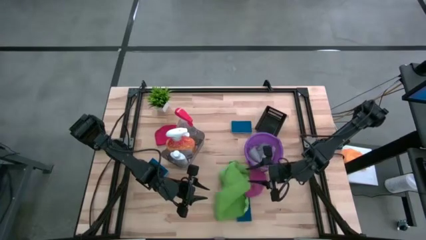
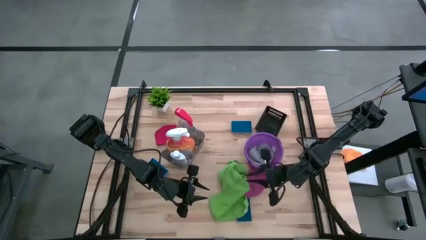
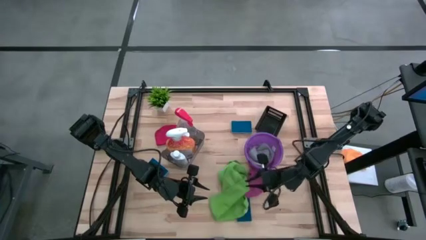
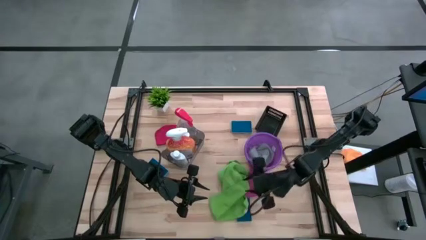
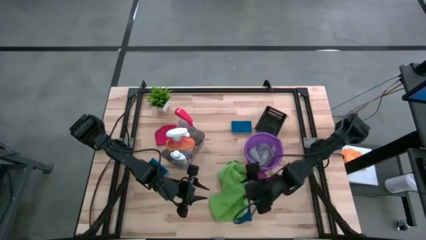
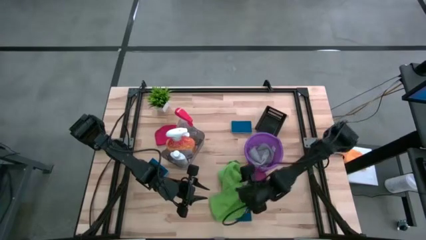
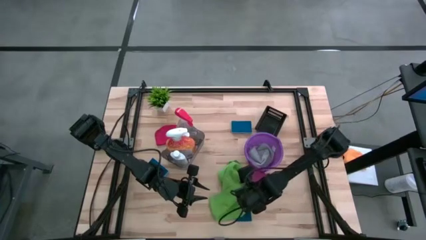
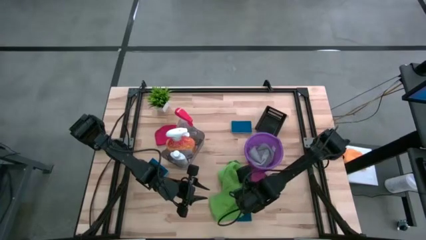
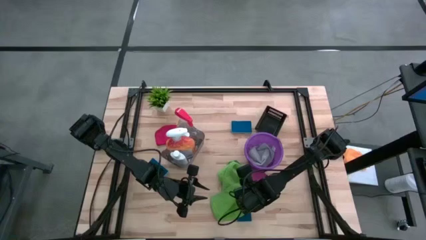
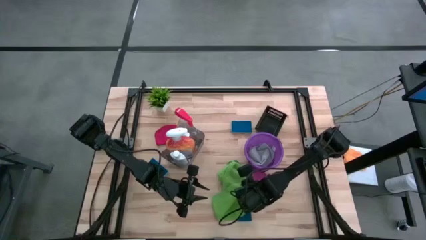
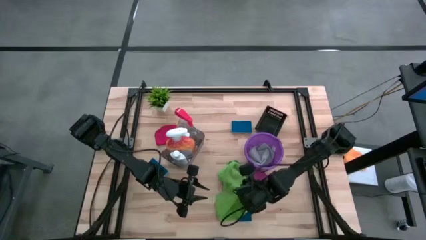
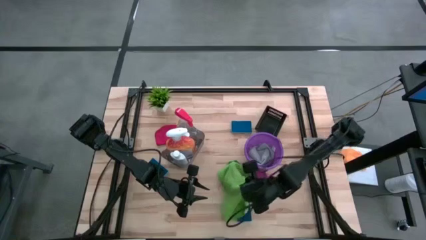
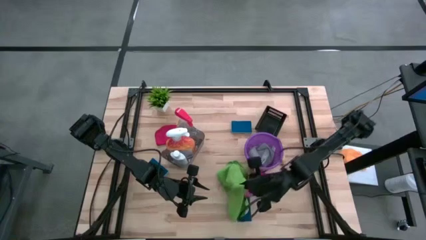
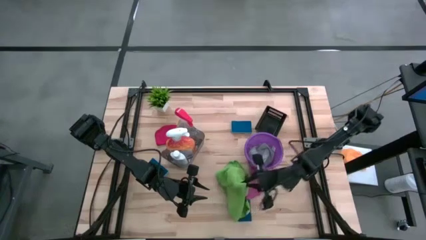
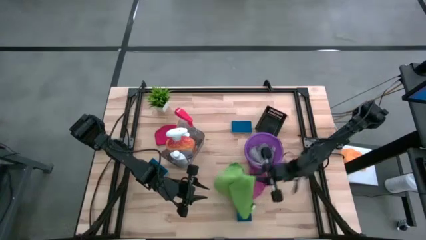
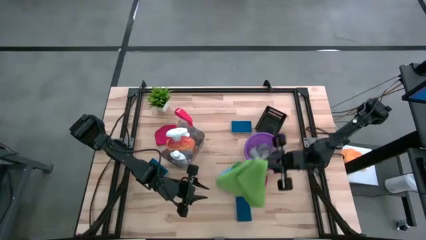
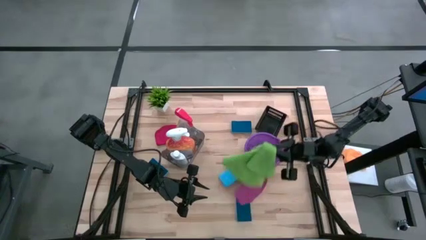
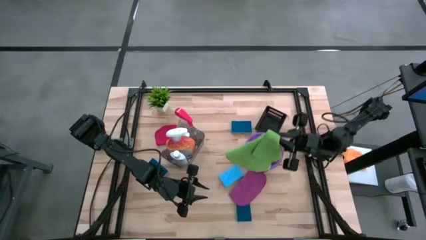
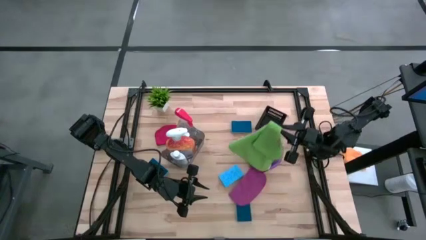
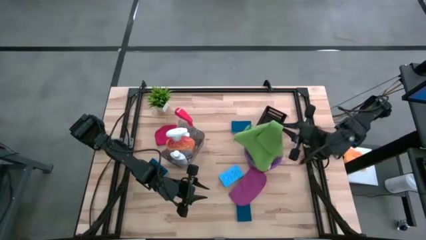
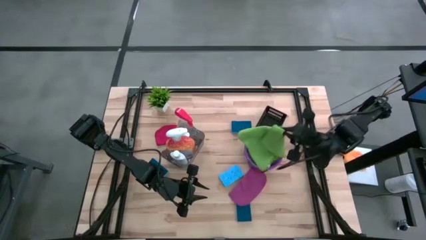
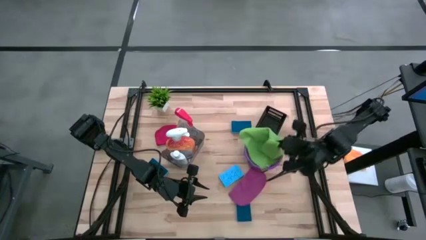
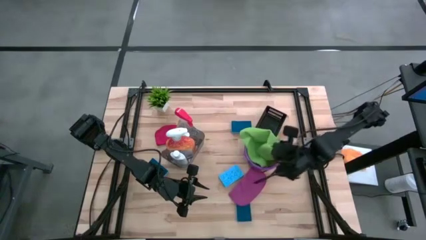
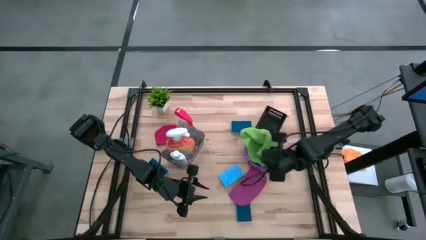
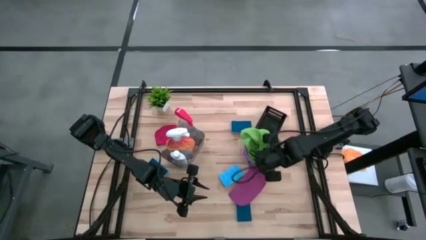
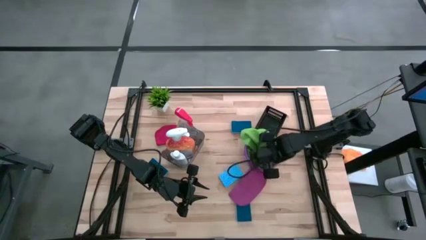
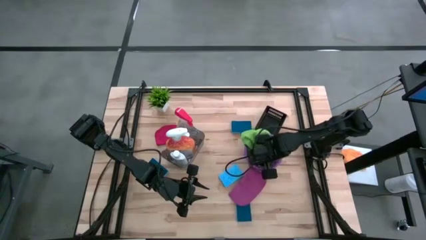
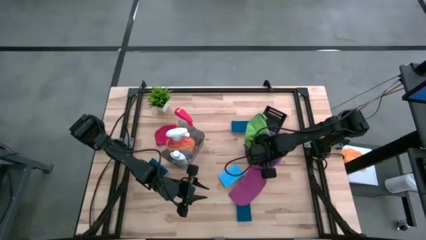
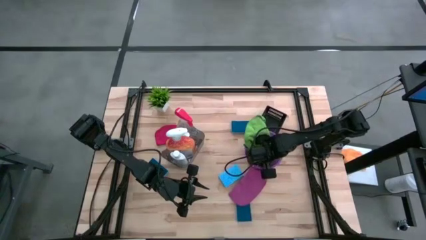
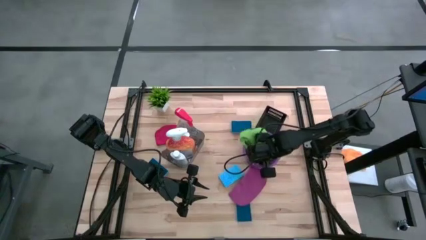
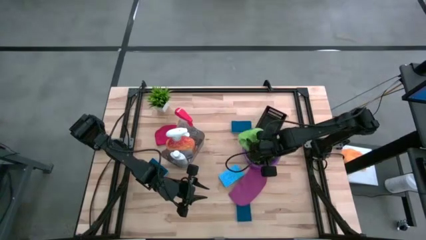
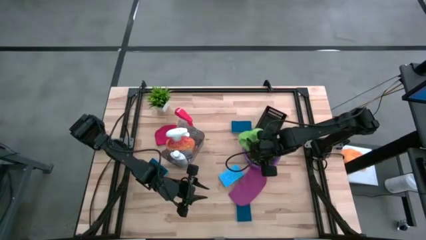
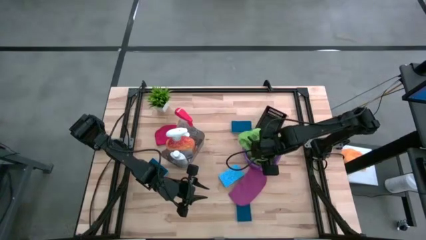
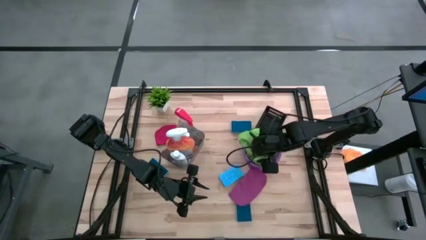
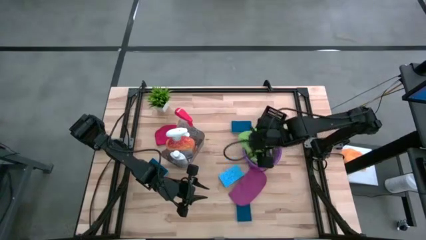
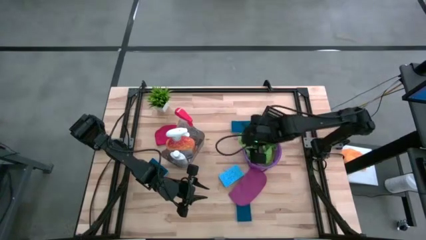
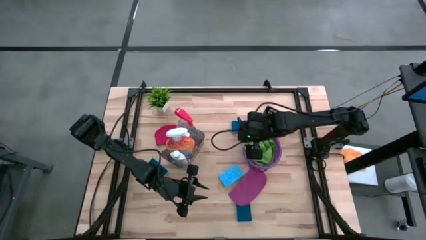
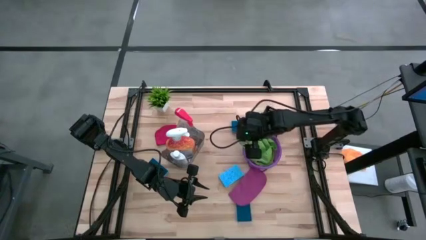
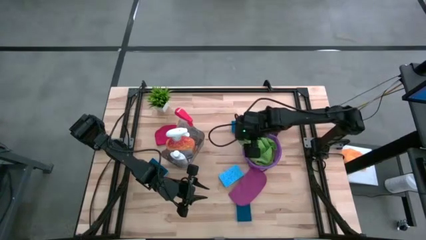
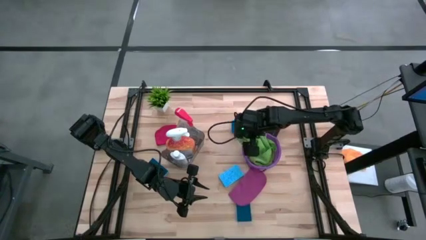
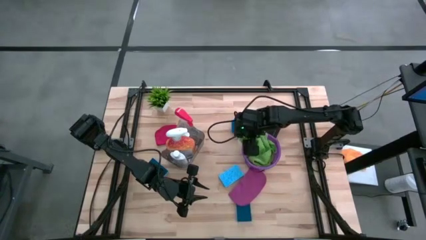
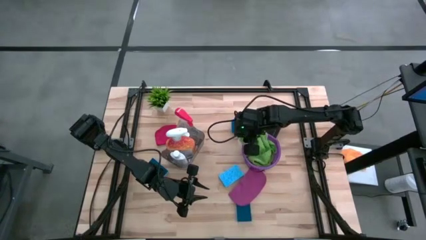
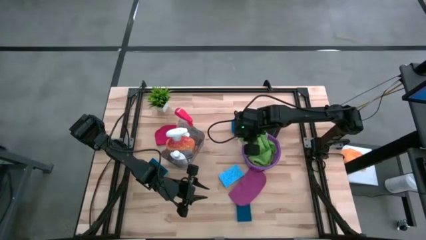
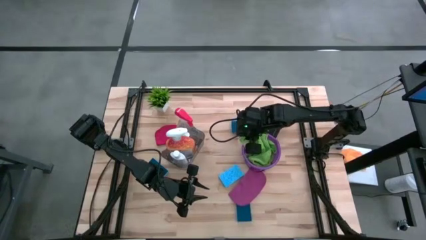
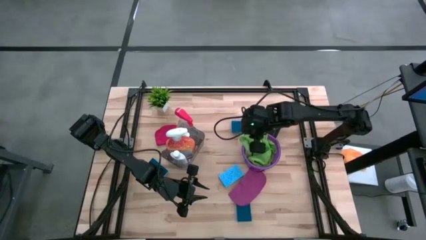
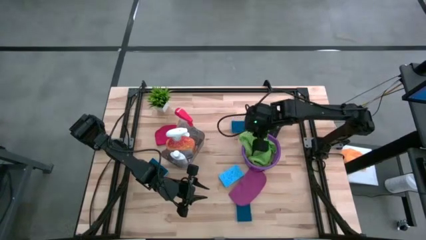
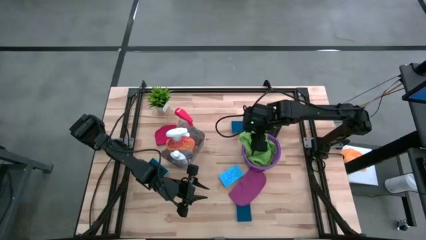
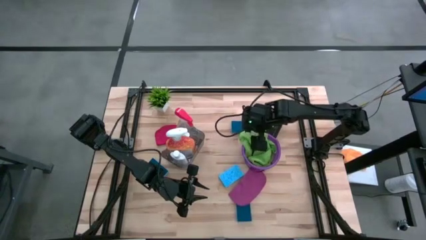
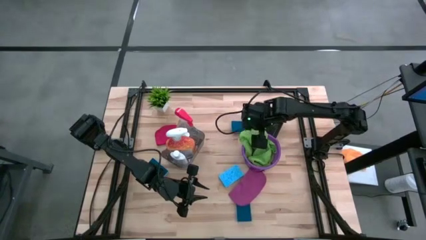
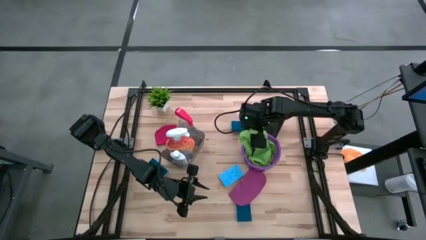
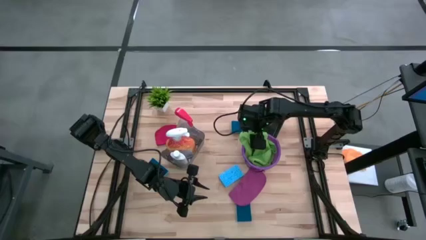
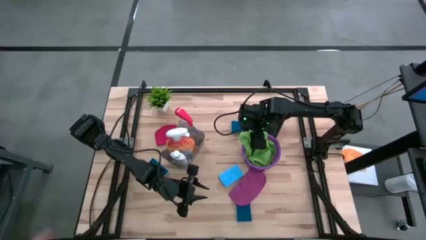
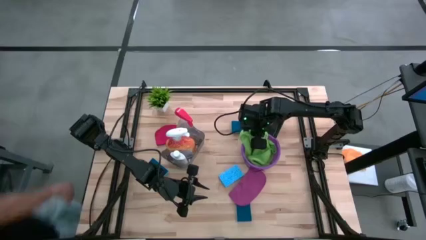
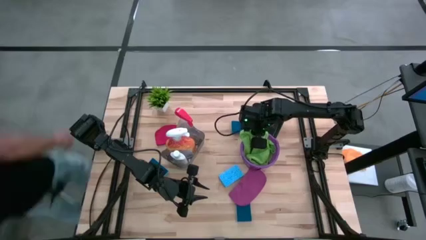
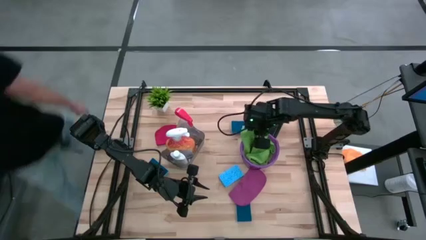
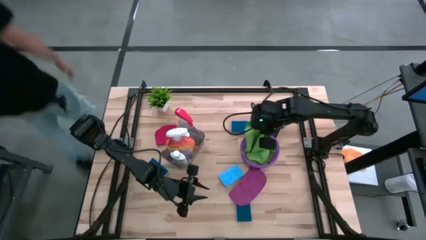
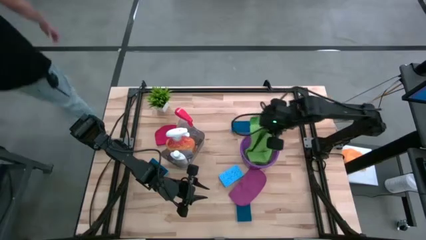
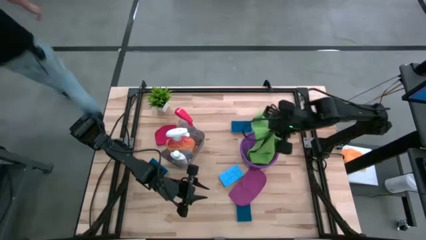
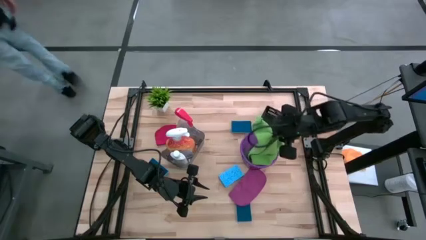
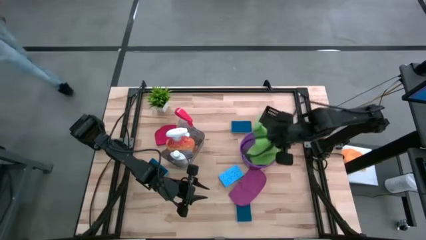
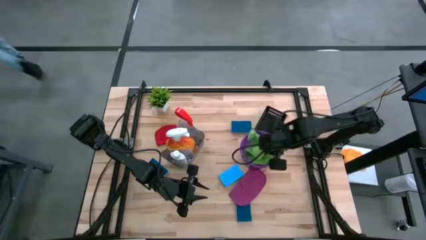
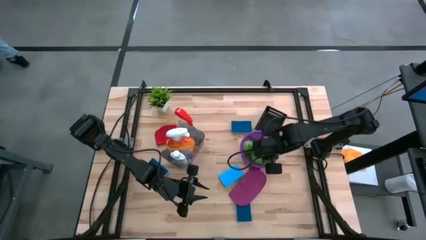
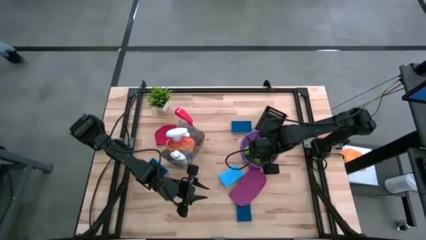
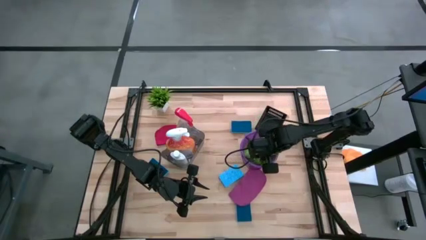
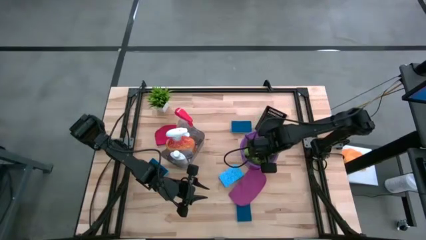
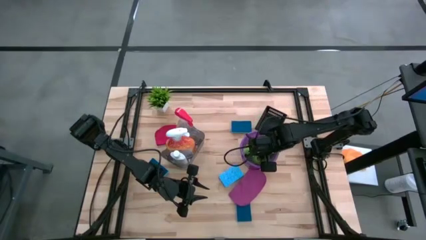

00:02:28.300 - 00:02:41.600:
Task: Pick & Place Kitchen Items
Put the green microfiber cloth into the purple bucket

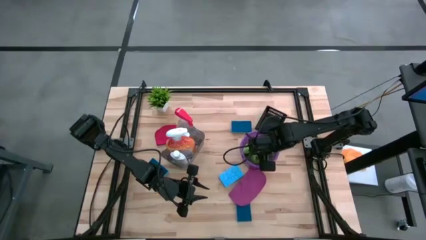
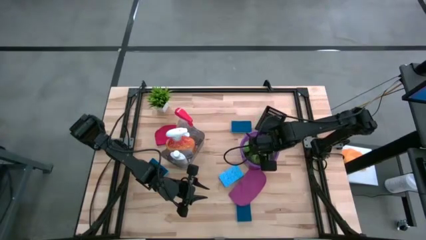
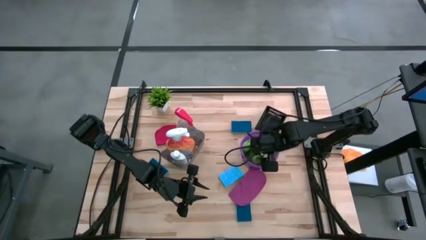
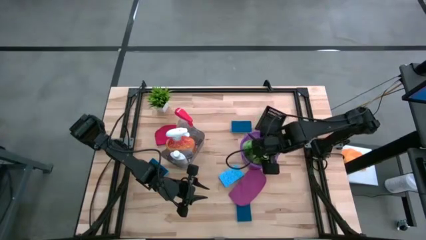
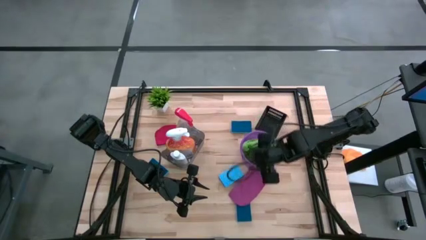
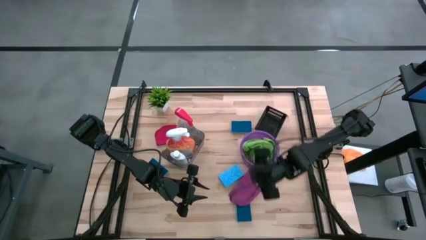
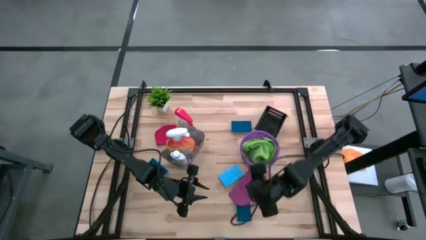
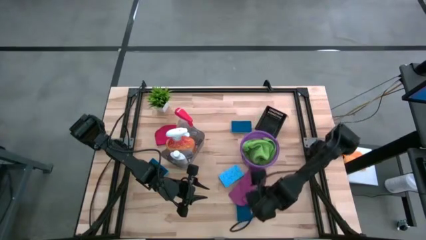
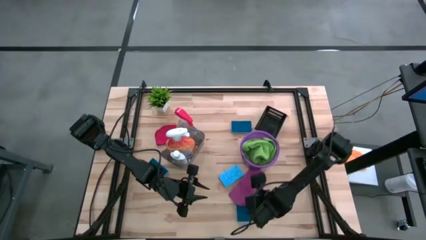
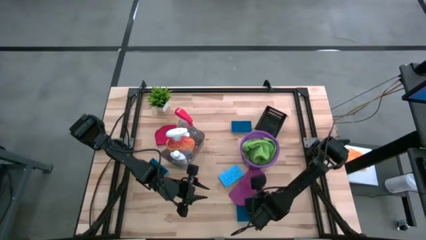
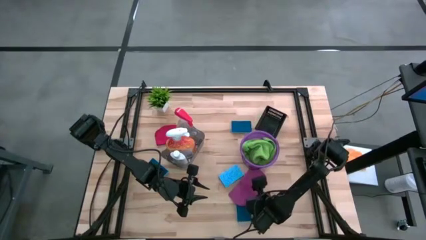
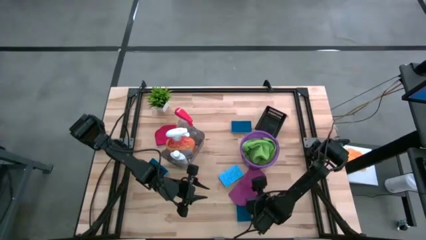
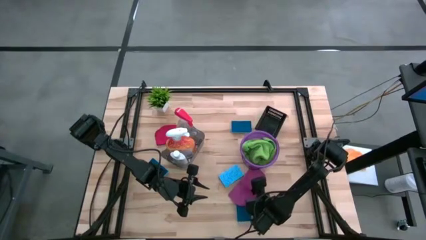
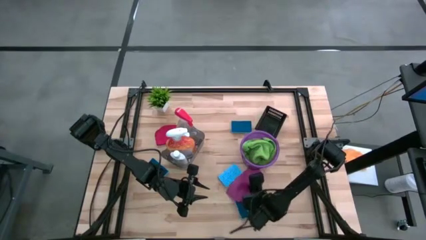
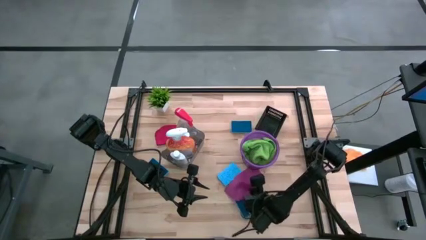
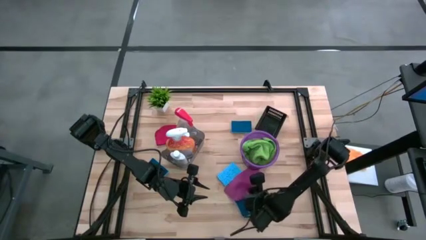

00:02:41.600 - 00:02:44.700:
Put the pink microfiber cloth into the purple bucket
